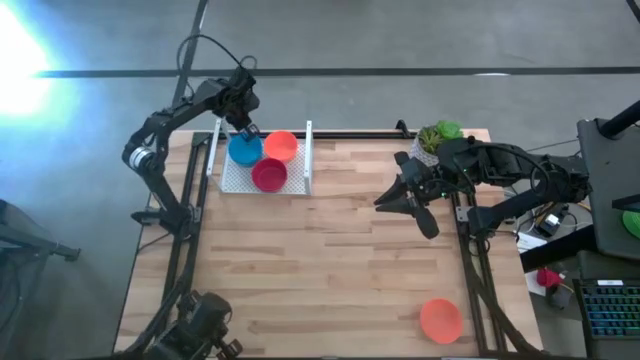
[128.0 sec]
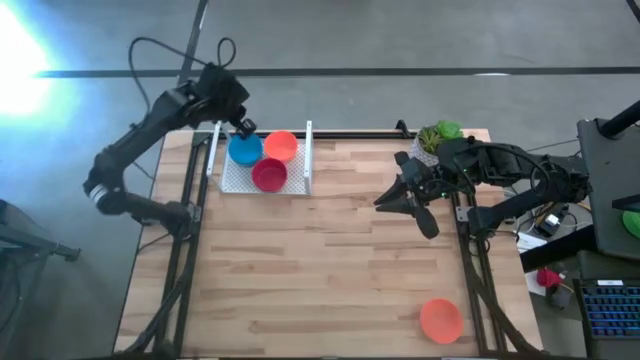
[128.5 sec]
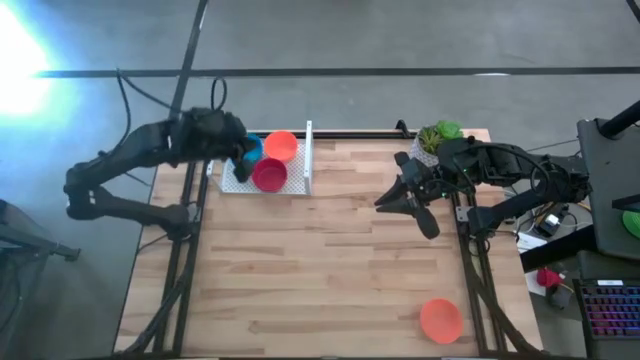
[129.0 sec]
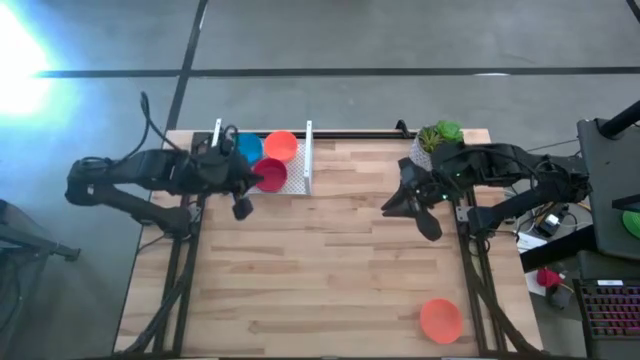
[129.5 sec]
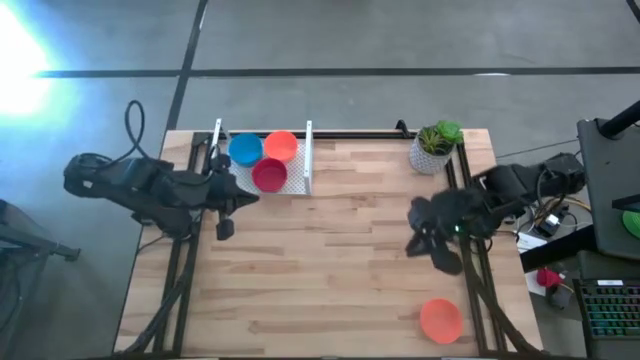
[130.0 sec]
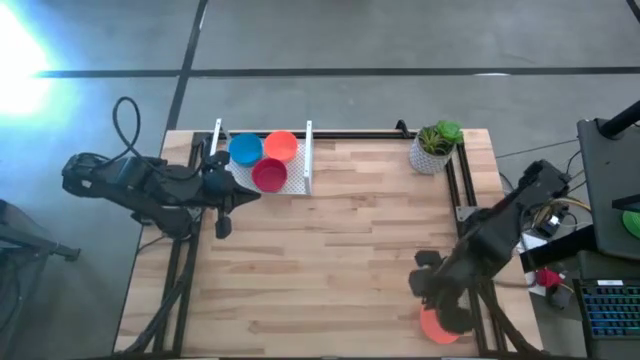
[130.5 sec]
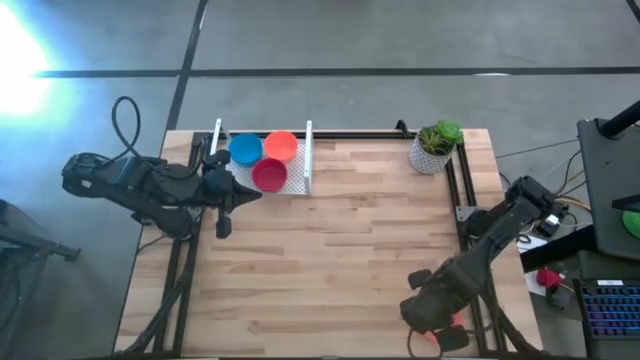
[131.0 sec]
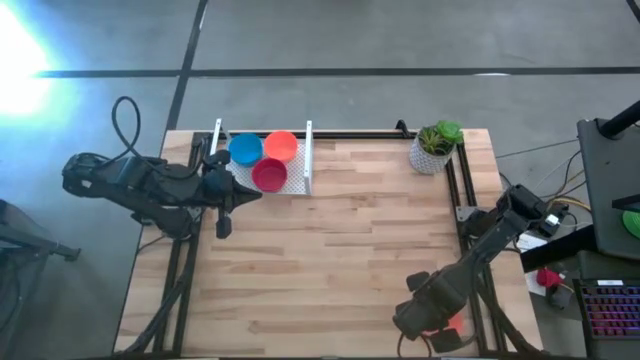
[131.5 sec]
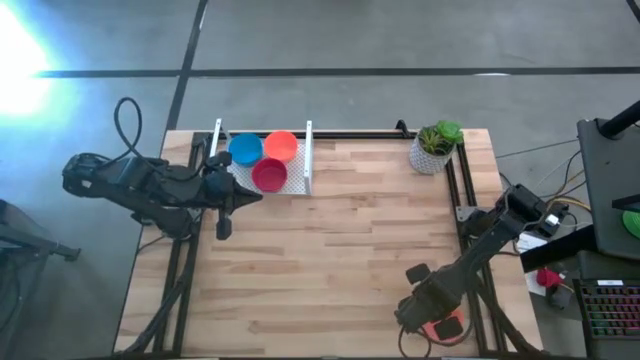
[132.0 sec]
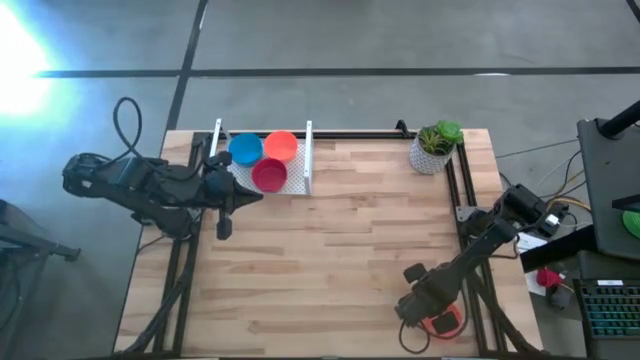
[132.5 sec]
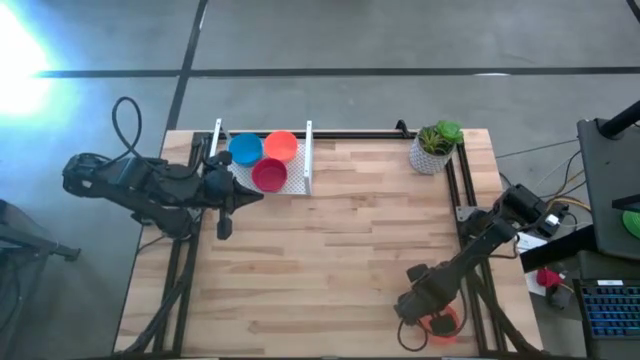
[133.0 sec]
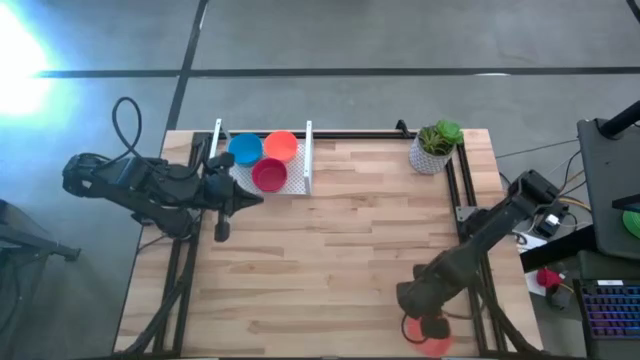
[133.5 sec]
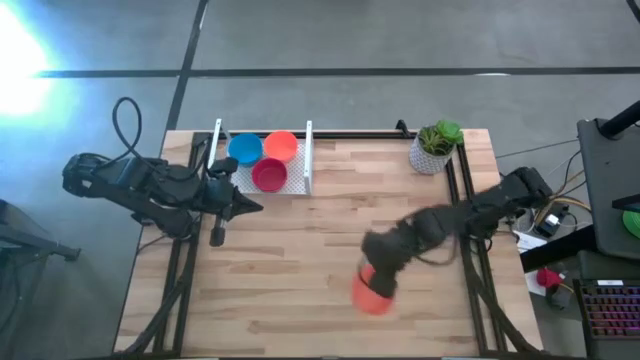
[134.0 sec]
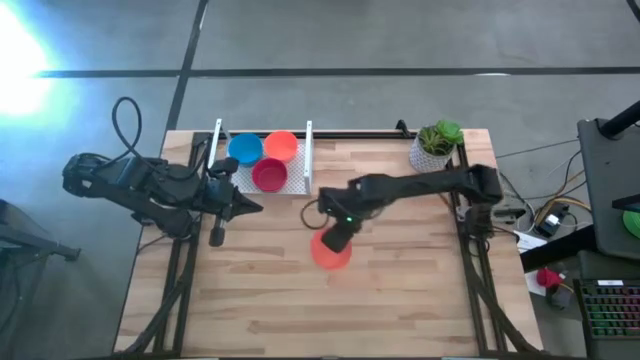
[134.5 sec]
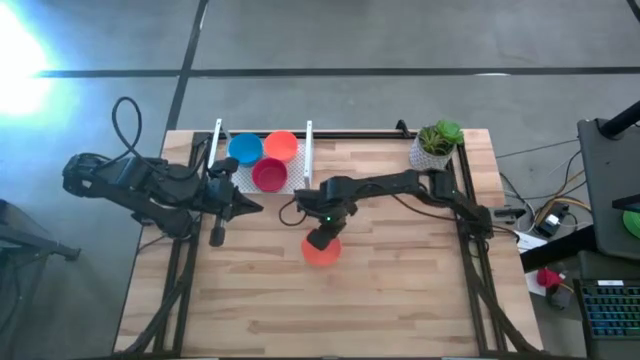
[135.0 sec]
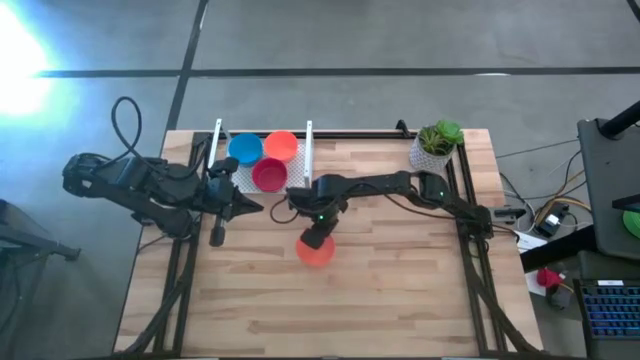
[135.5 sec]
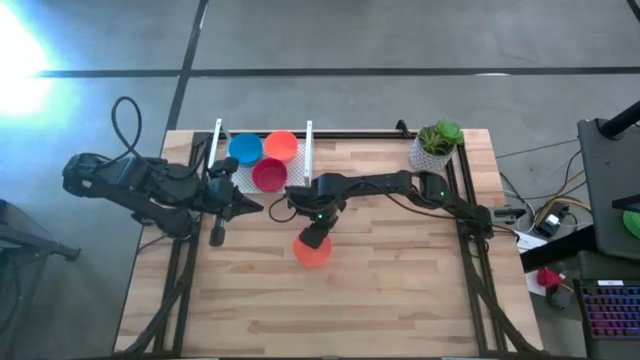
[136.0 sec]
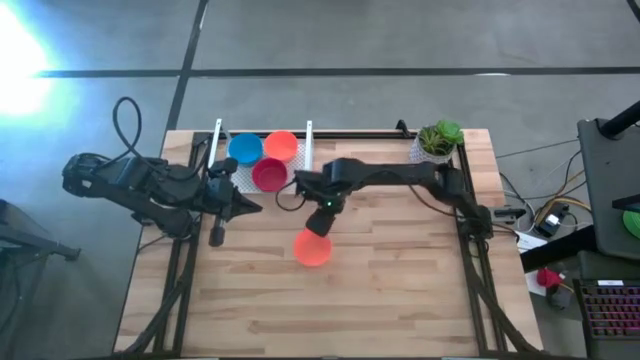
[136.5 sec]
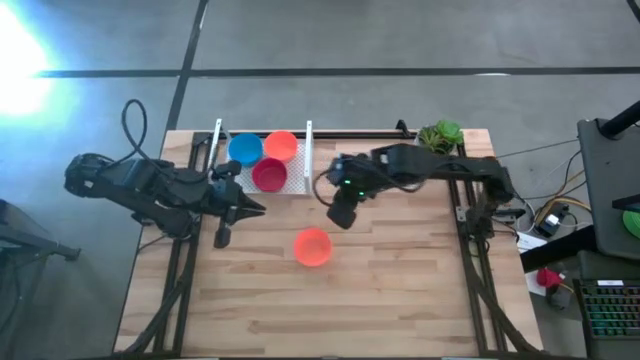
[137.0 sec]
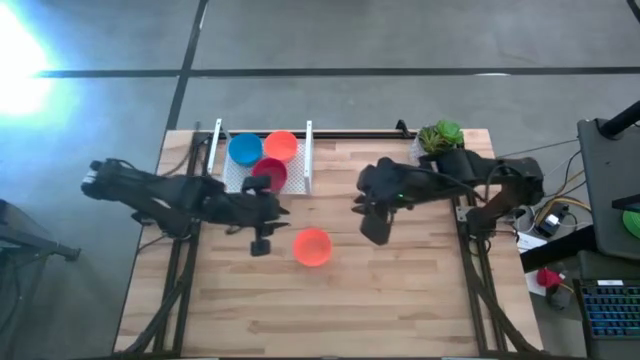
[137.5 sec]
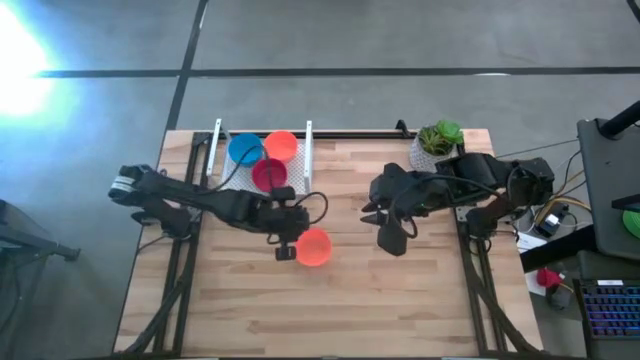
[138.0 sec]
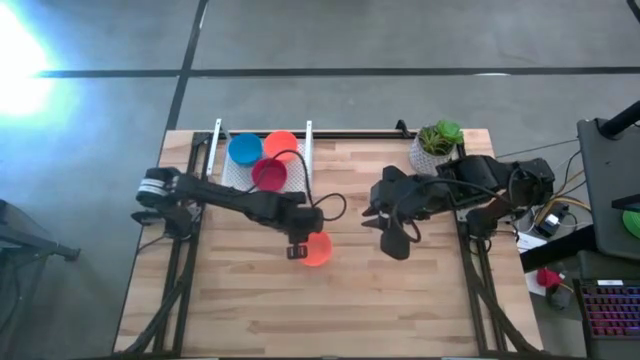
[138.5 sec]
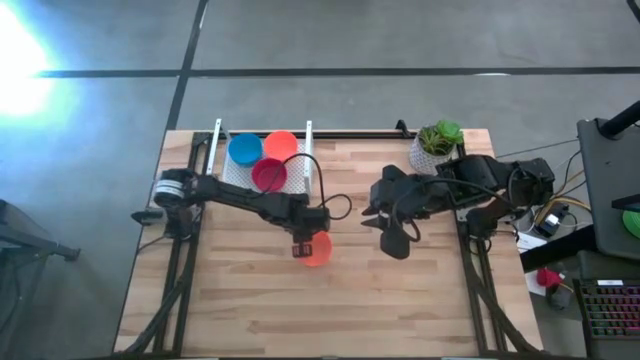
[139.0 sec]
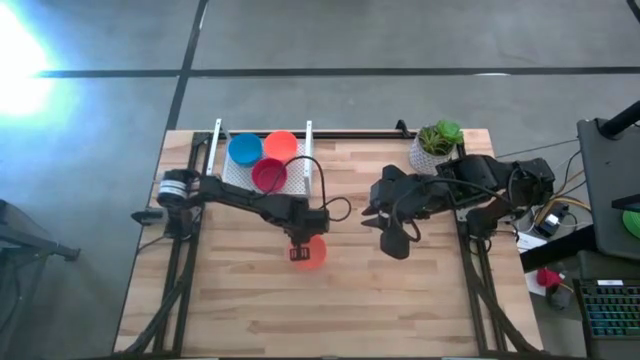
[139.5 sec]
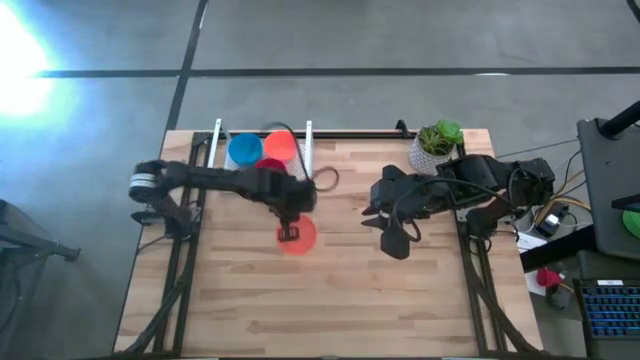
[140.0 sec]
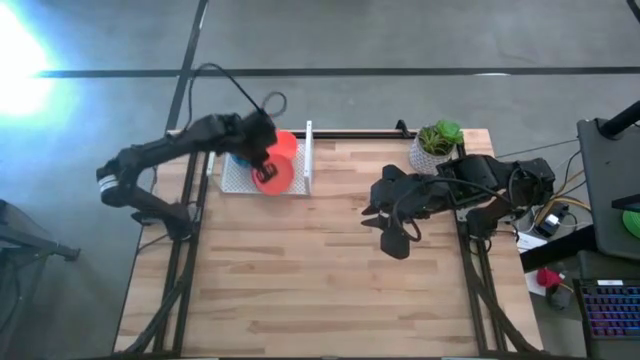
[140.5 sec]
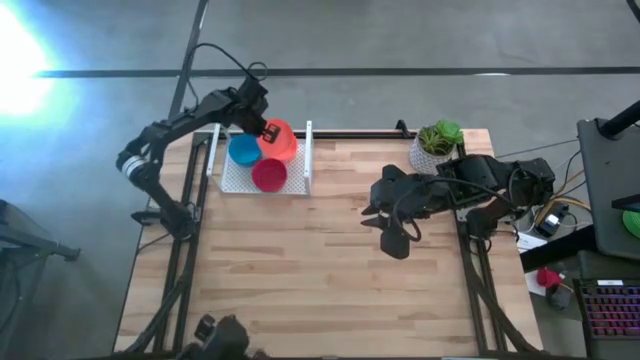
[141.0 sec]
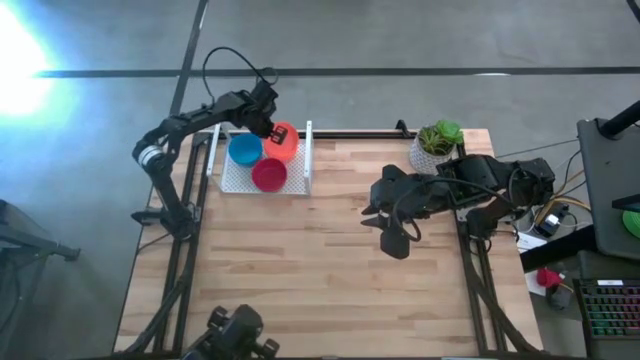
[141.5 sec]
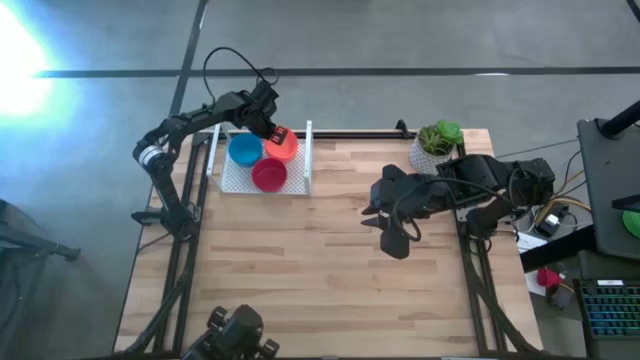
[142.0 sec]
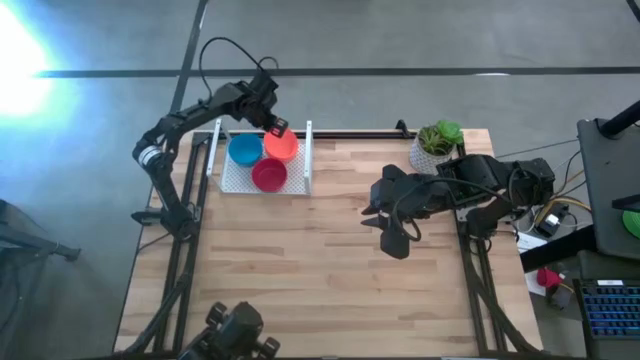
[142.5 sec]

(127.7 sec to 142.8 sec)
Task: Pick & Place Mini bowls
Stack the orange bowl on the stacked orange bowls on the shelf

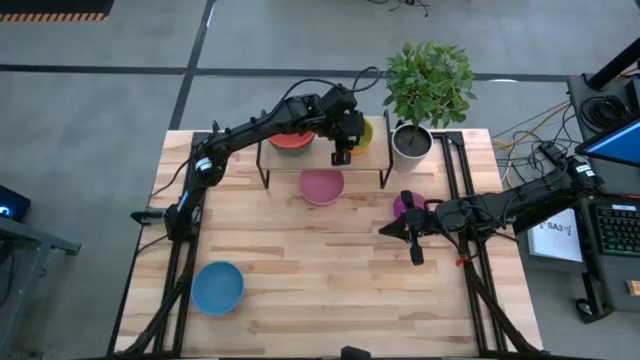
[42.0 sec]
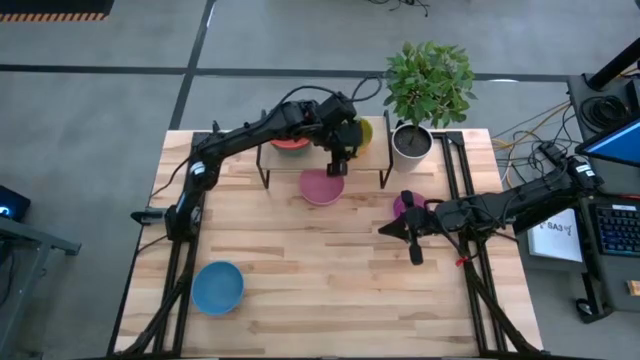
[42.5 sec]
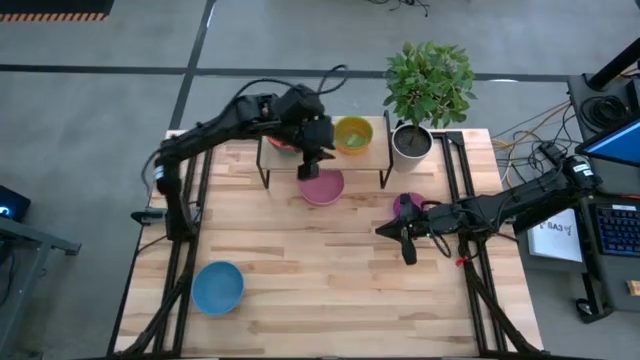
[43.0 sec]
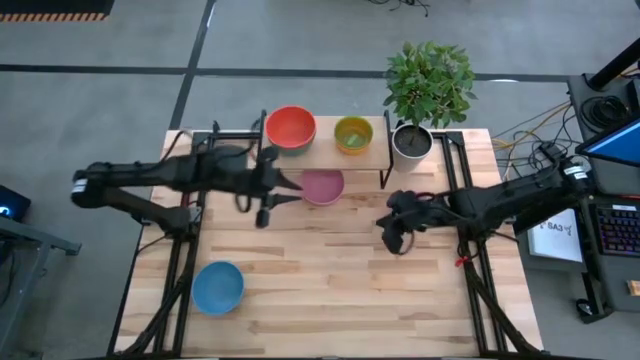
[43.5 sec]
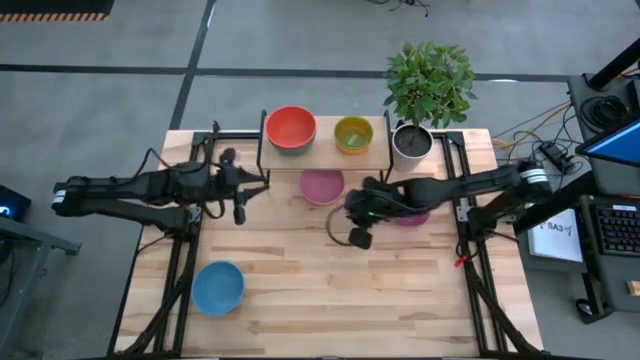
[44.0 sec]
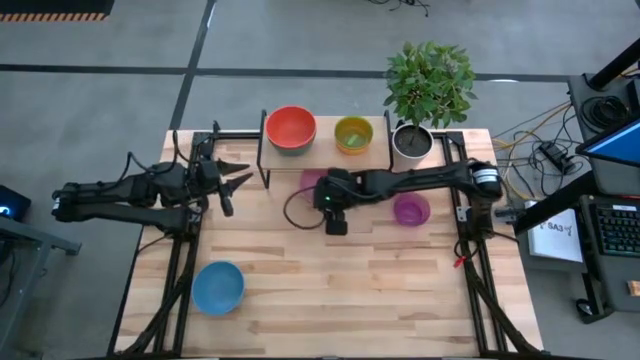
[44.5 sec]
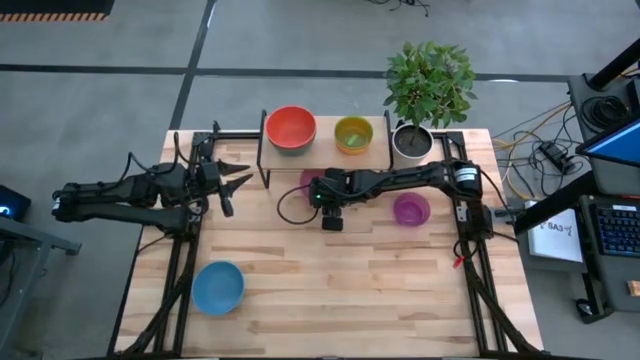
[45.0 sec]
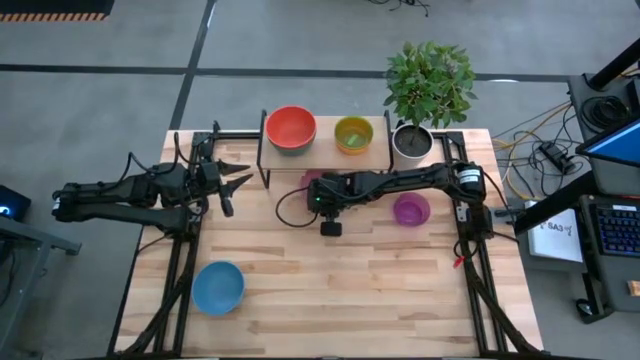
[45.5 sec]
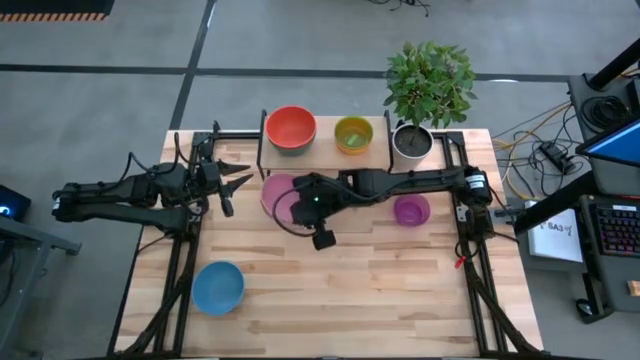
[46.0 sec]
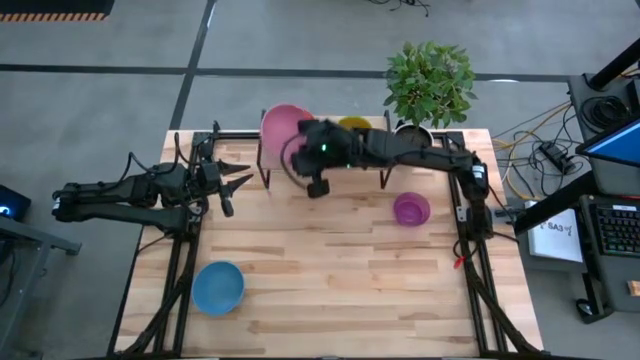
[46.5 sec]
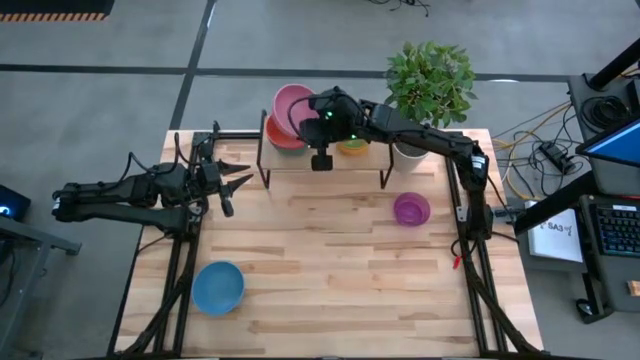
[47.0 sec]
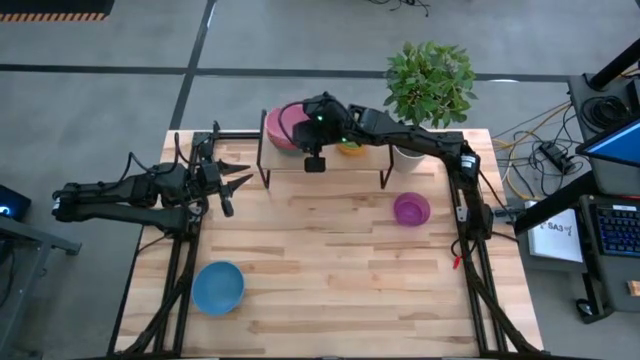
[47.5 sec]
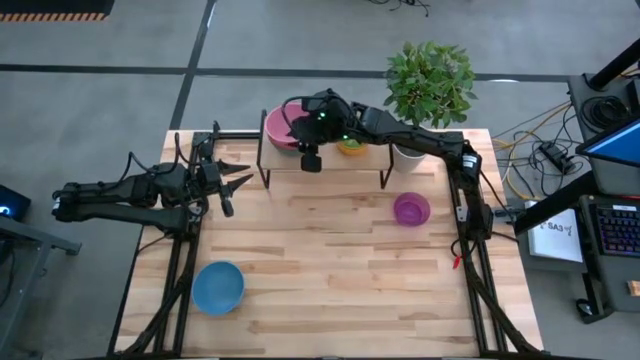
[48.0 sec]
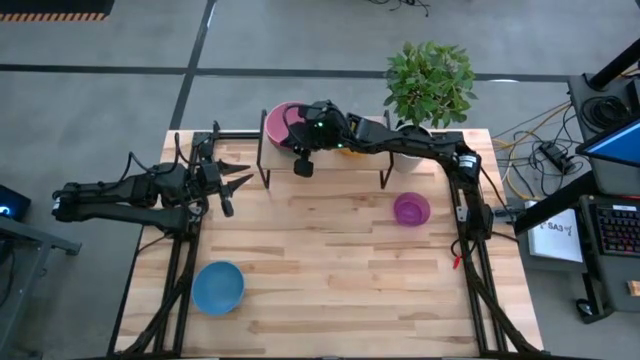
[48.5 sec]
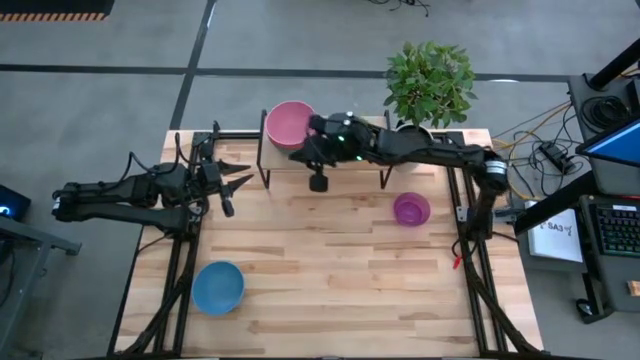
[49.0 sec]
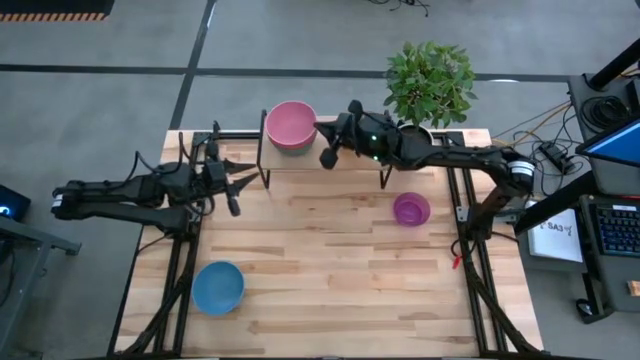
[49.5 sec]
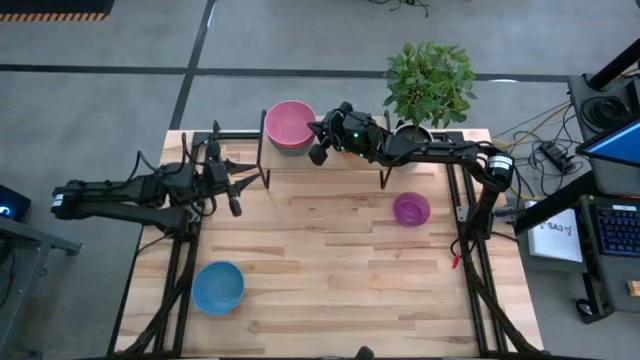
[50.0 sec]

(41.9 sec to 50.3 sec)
Task: Place and stack bowls onto a shelf
Stack the pink bowl on the dark orange bowl on the shelf
